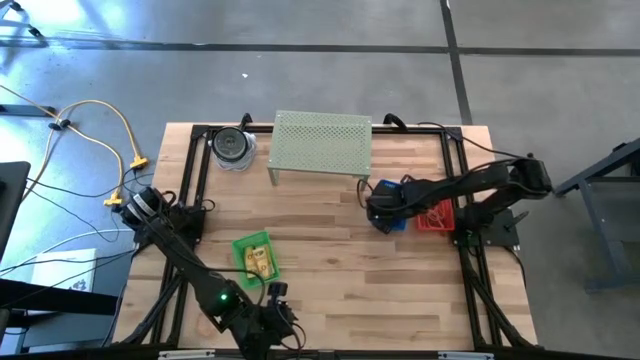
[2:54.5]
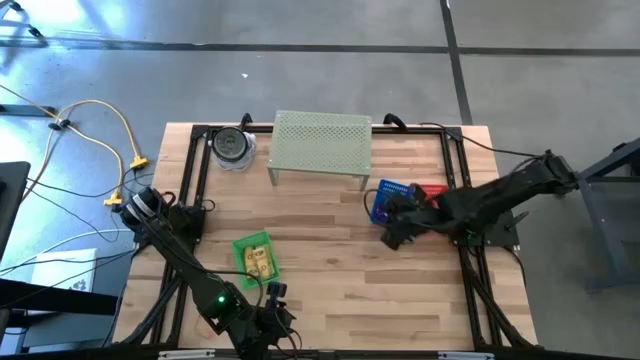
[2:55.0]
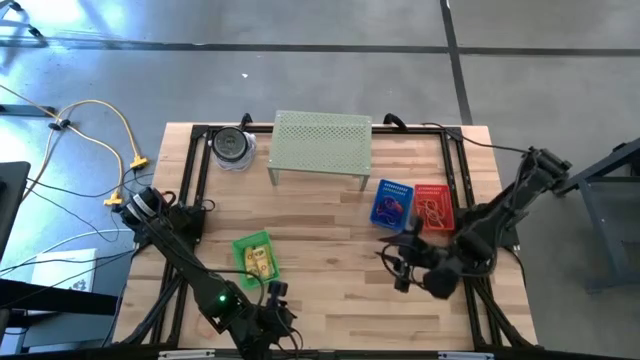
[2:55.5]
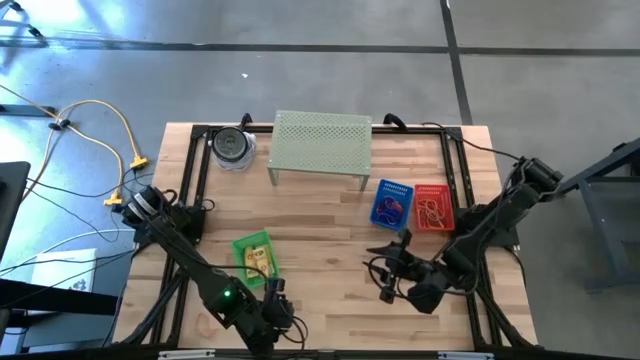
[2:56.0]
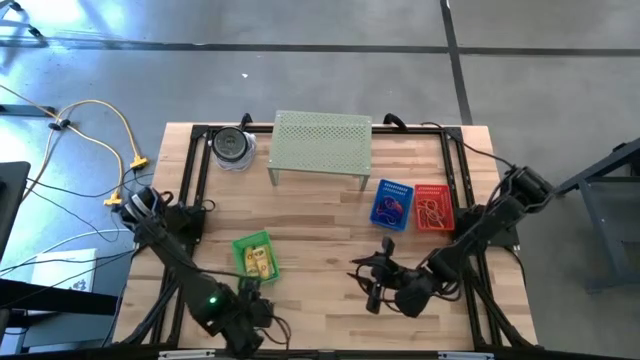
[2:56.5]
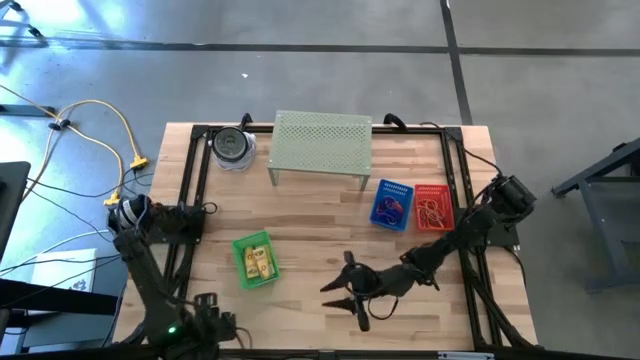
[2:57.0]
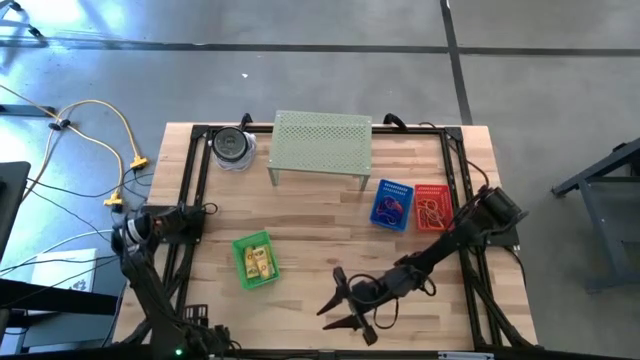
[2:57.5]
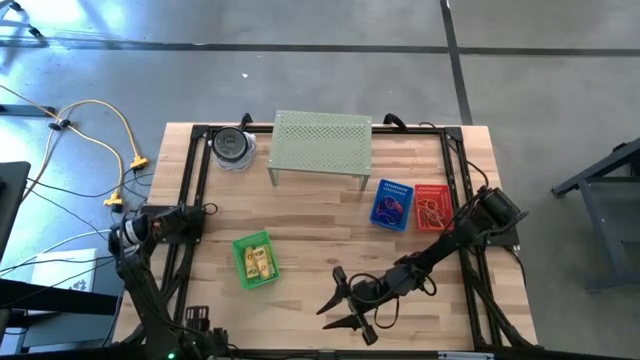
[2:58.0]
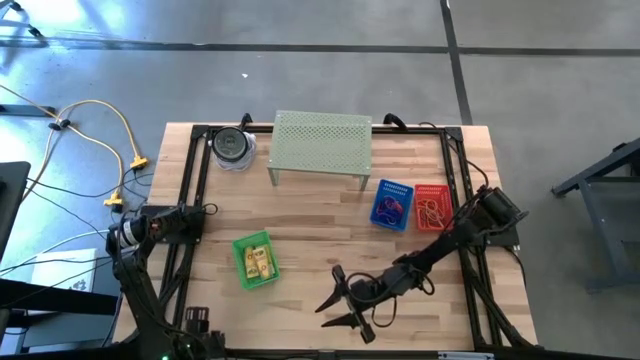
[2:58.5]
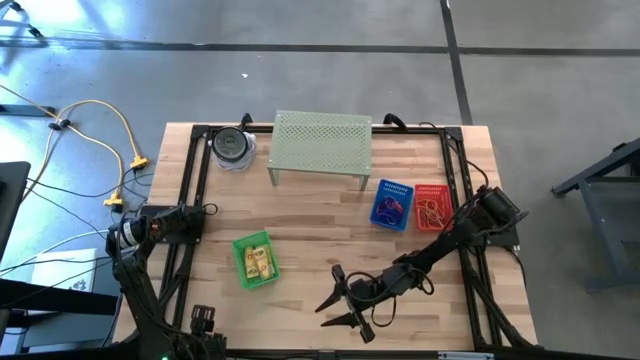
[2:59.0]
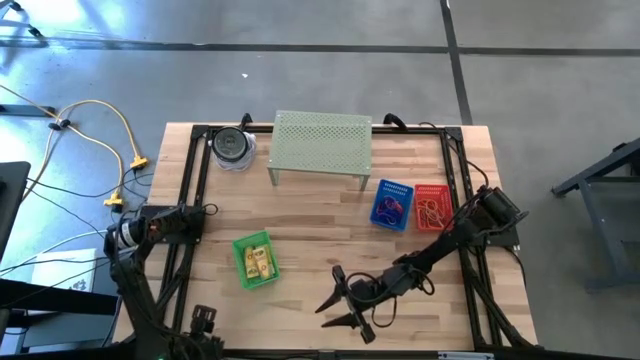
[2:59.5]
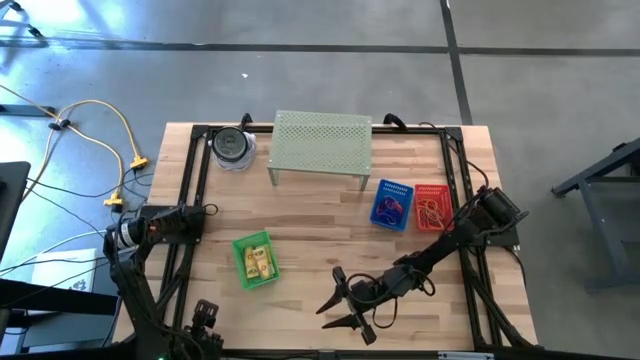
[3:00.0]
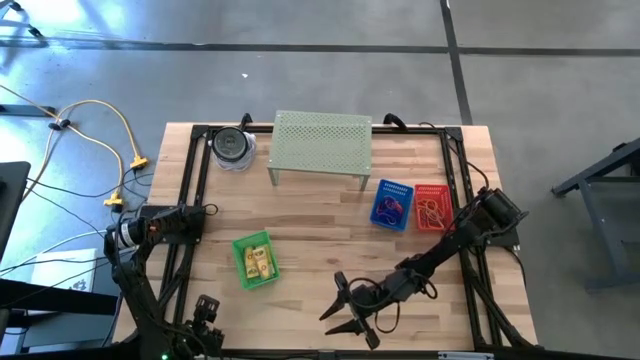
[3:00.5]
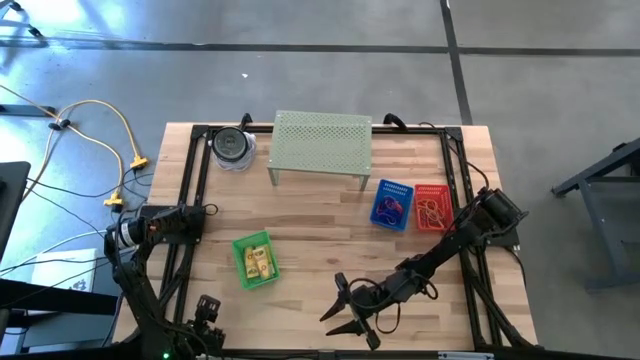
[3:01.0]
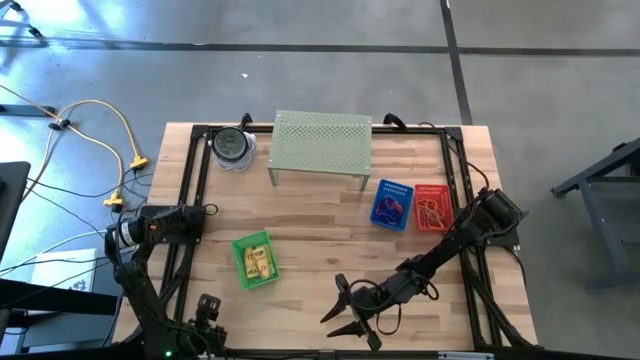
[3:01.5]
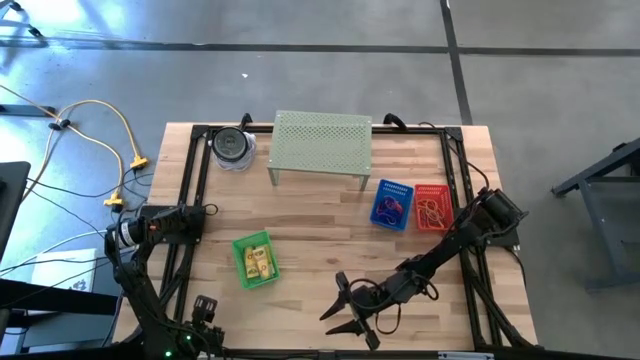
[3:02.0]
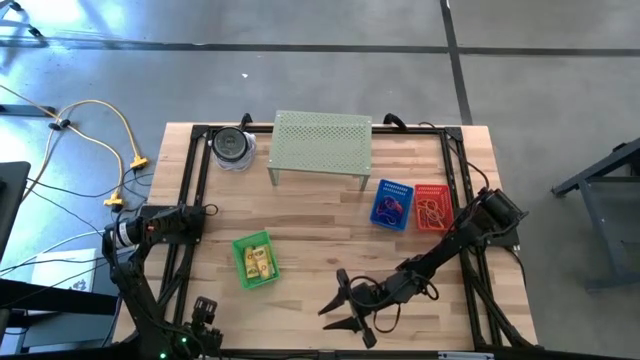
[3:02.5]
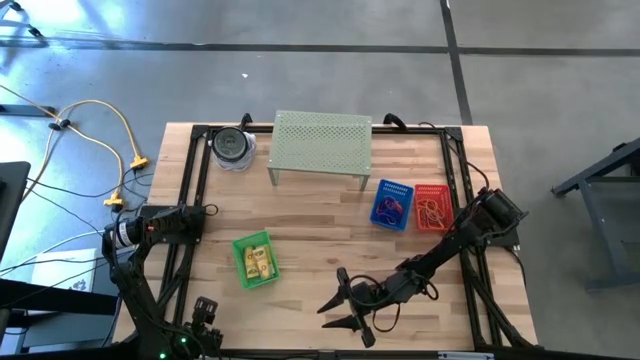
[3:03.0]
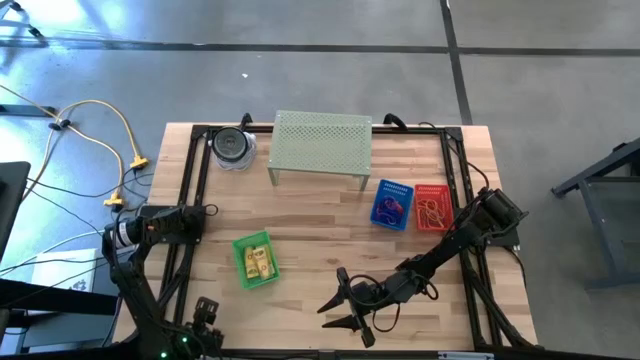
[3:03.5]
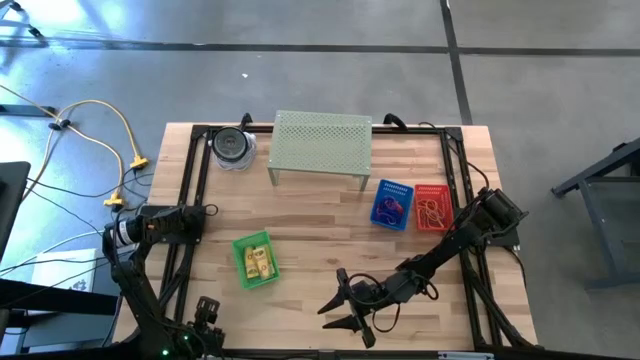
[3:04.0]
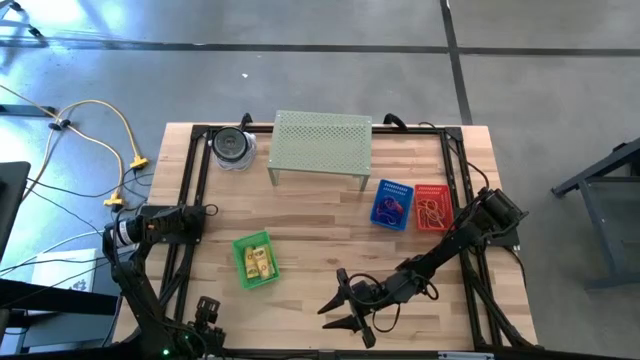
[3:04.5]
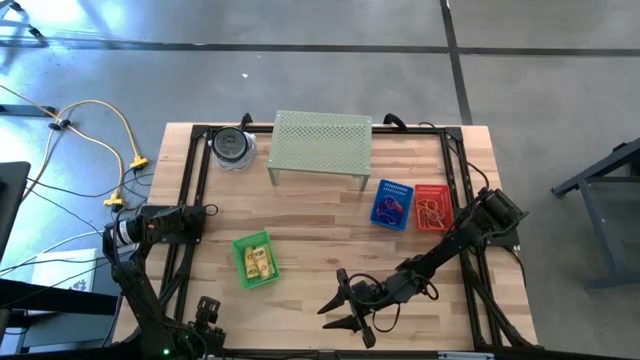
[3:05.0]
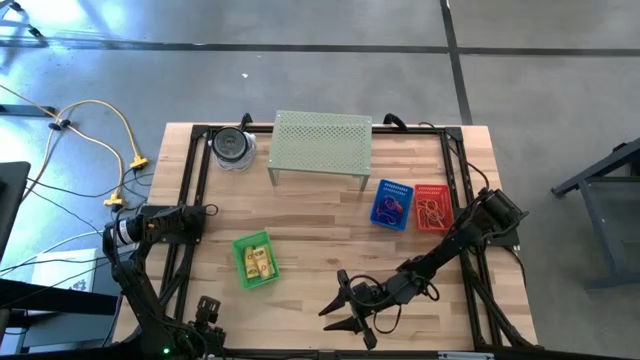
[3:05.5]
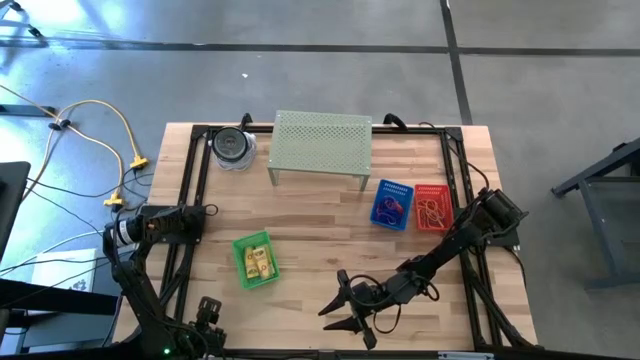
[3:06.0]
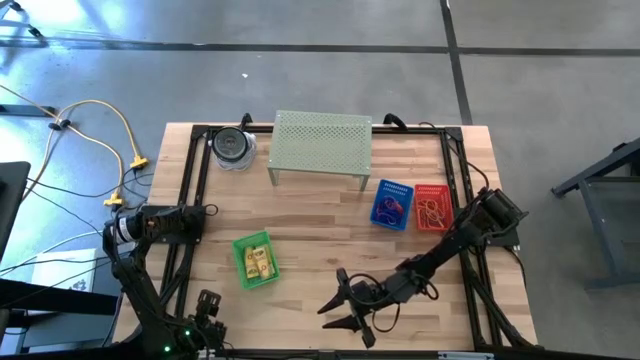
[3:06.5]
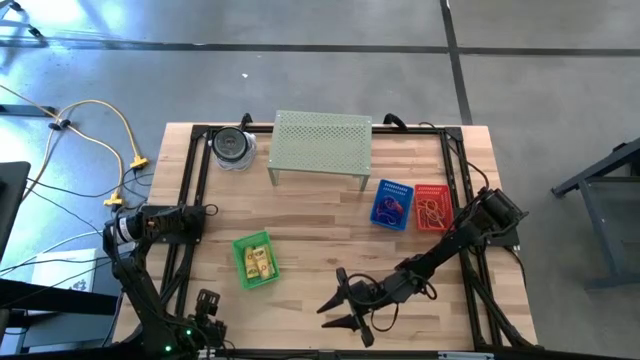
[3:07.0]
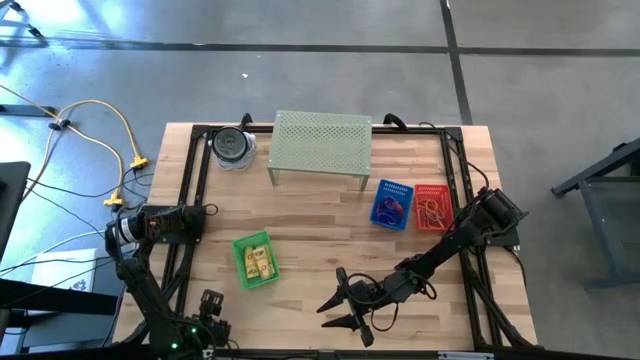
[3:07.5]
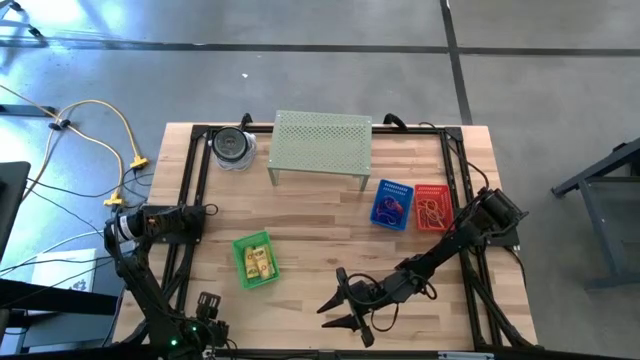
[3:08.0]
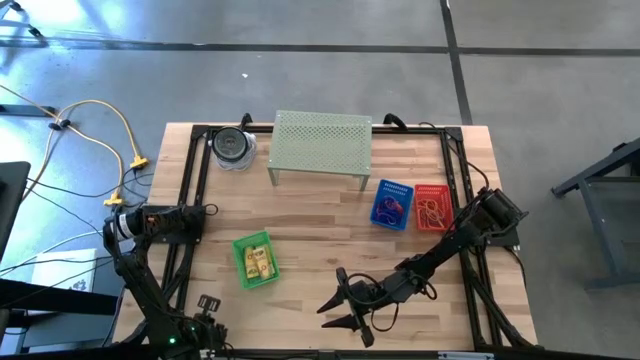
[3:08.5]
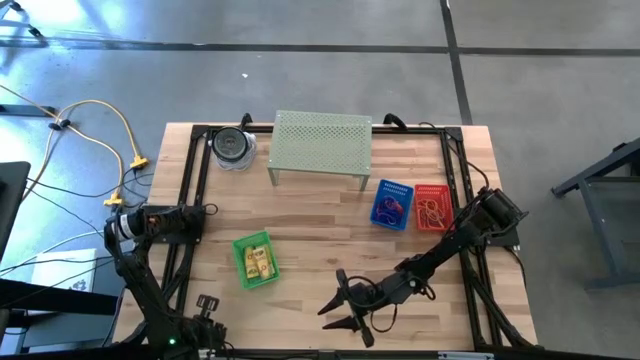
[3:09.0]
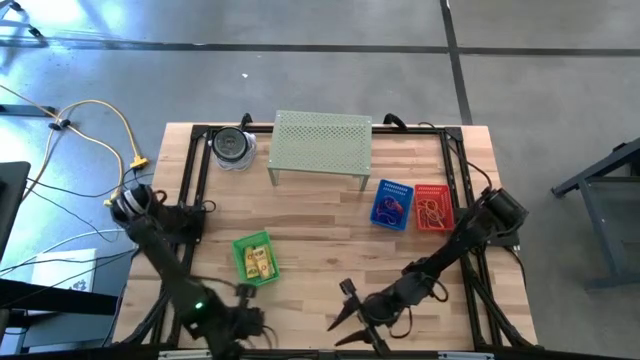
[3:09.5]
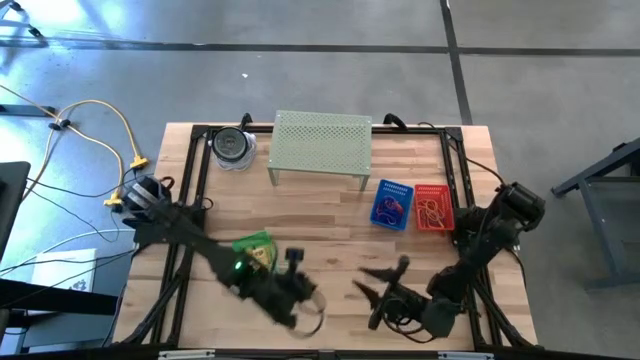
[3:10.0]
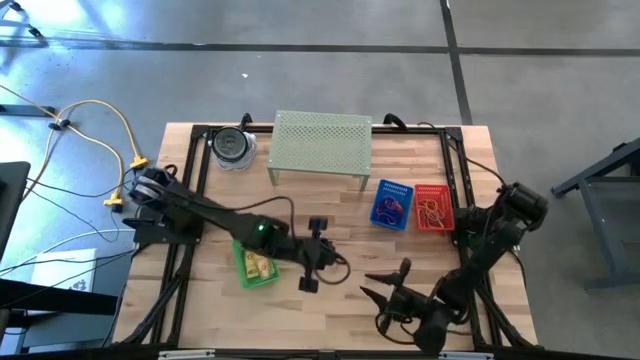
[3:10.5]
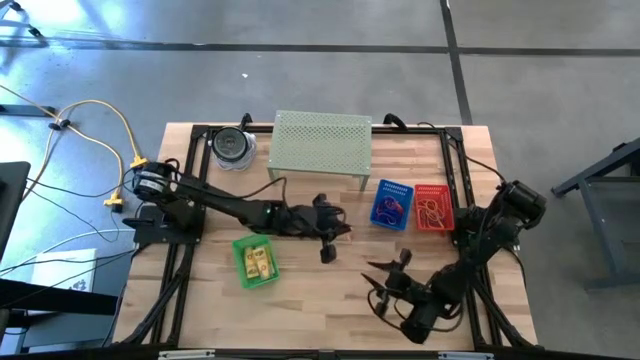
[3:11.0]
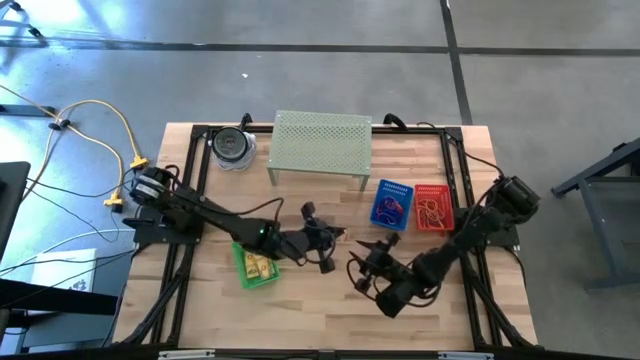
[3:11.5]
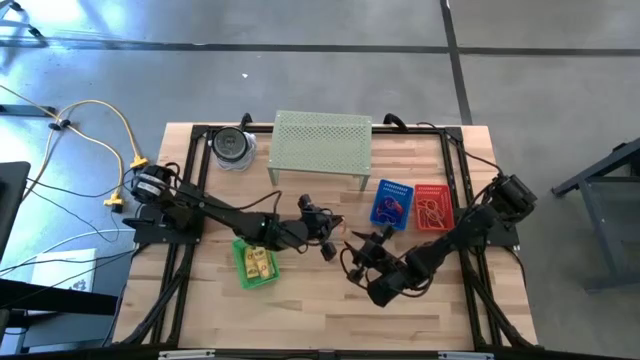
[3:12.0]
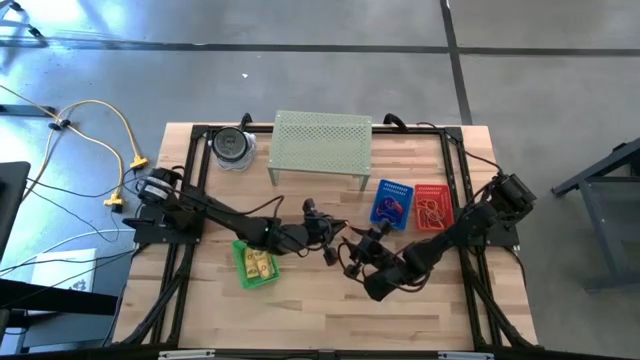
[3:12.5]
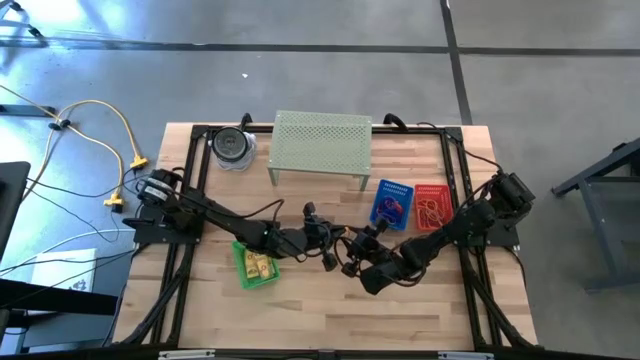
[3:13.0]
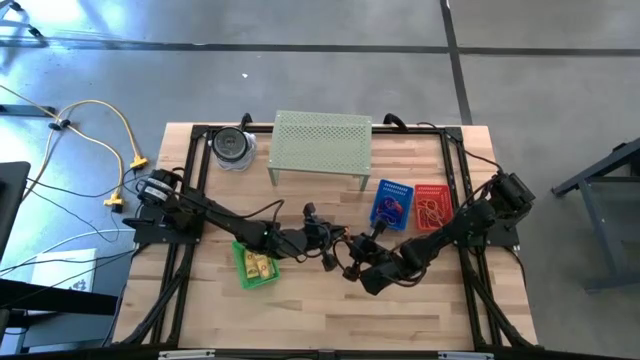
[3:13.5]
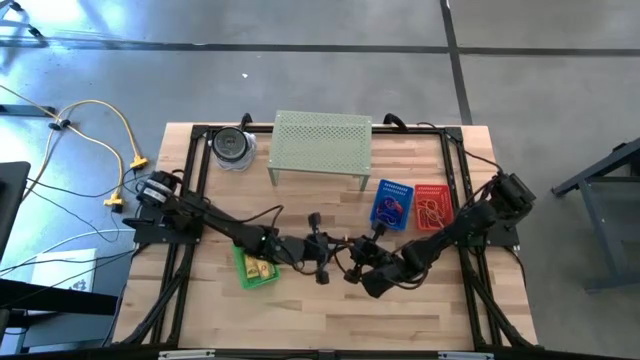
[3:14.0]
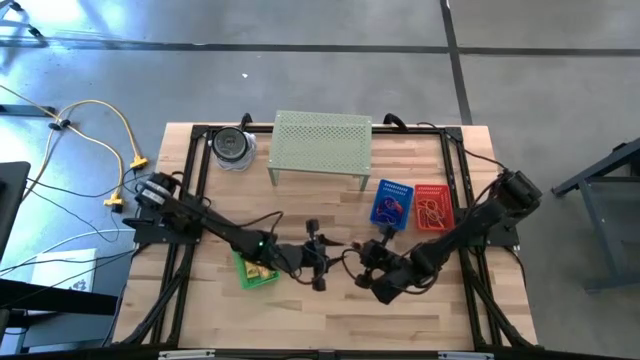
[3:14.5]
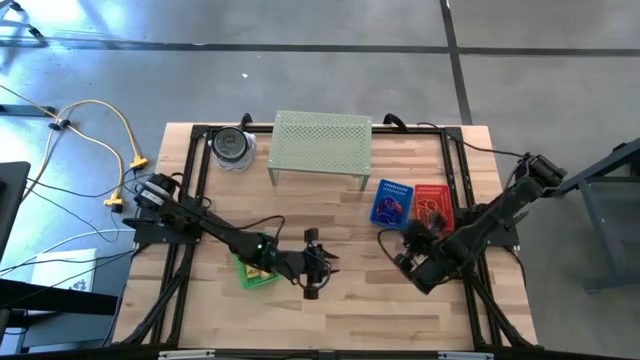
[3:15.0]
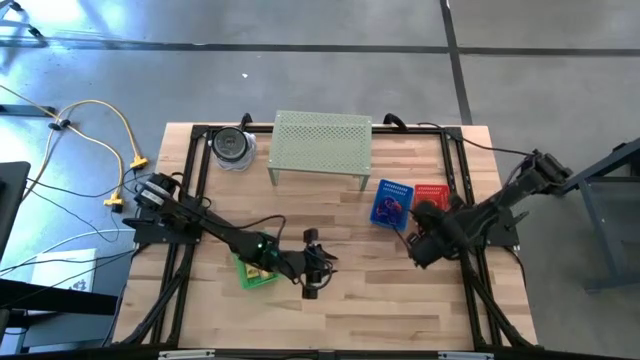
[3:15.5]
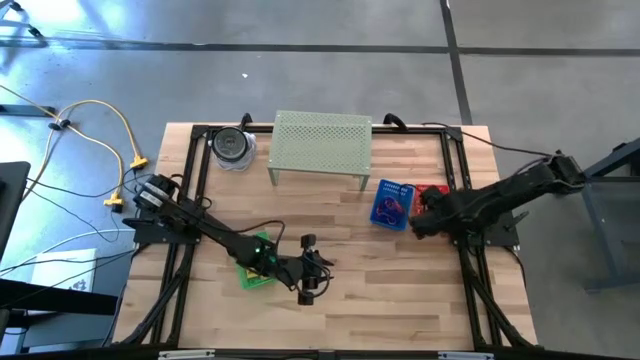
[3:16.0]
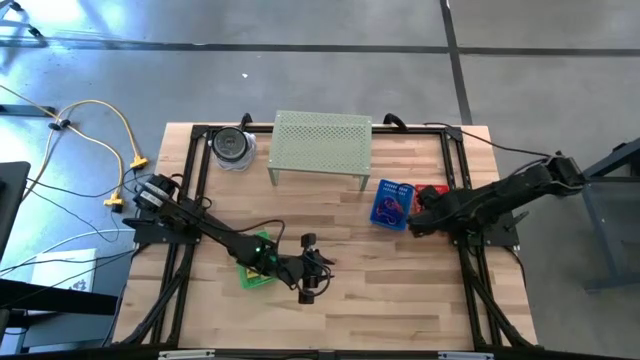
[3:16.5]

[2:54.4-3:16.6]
Task: Pick & Place Office Desk Supplies
Put the orange rubber band into the red bin
